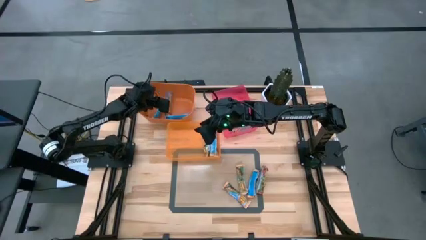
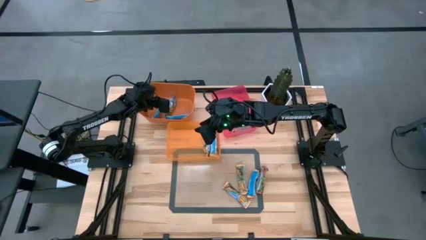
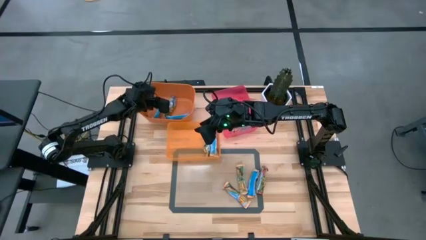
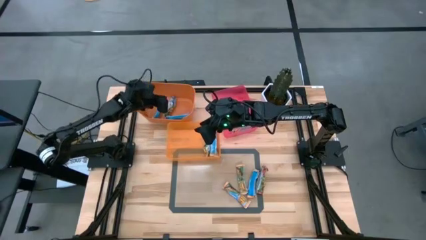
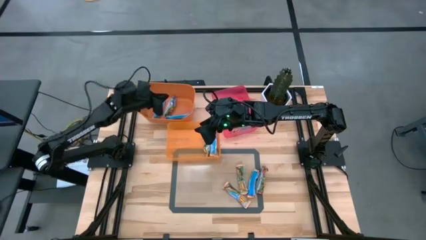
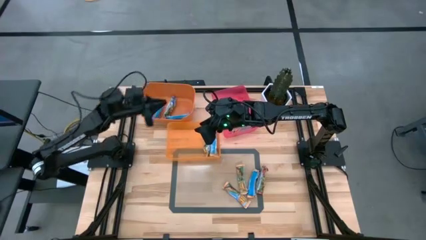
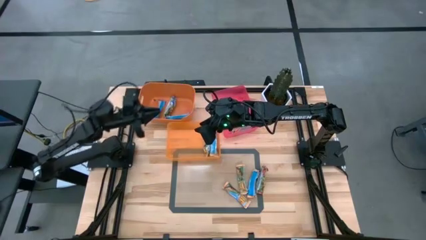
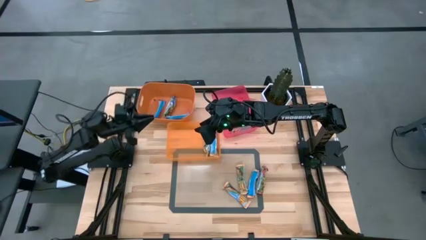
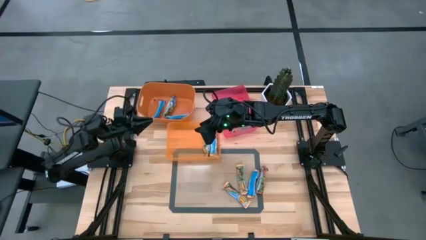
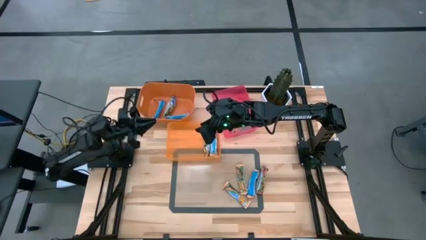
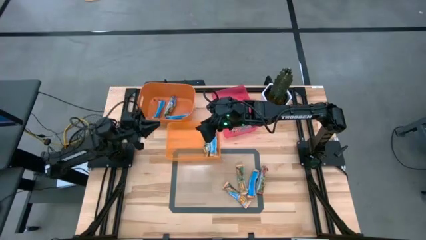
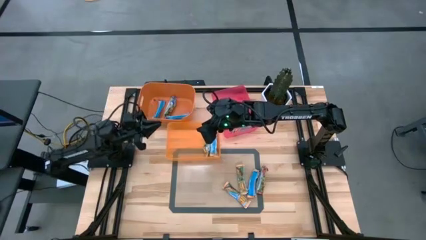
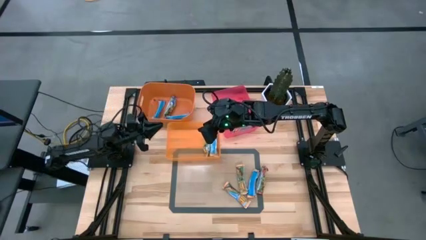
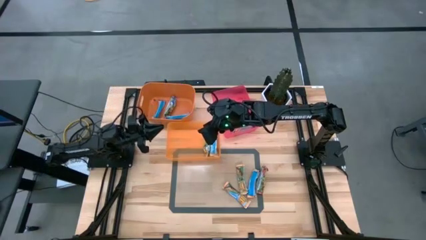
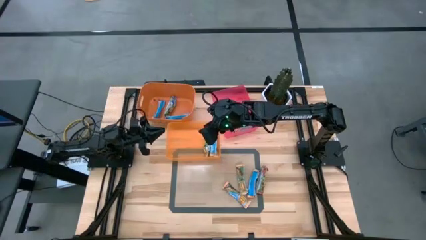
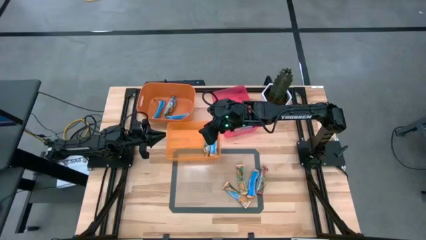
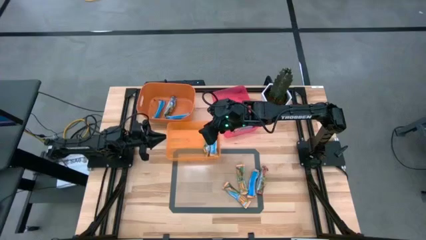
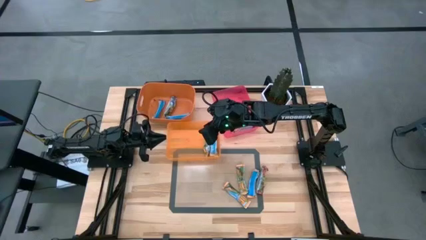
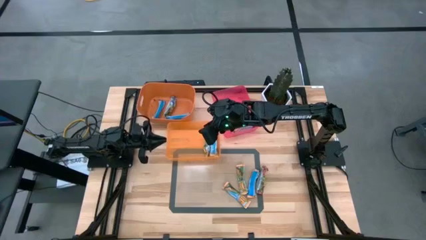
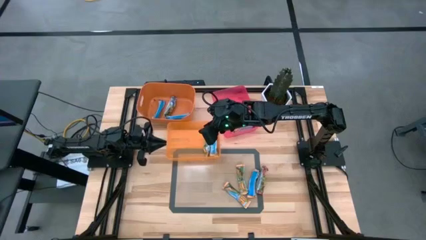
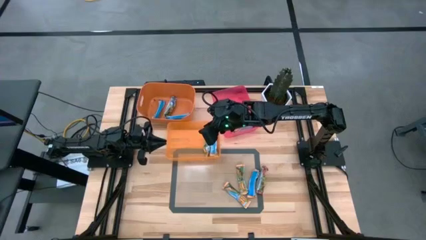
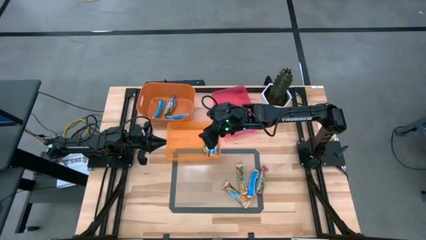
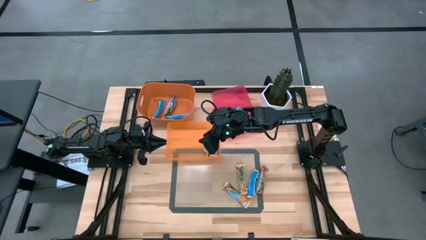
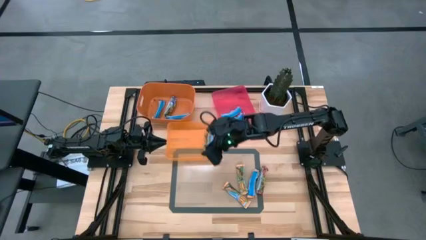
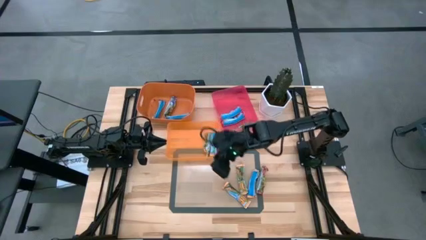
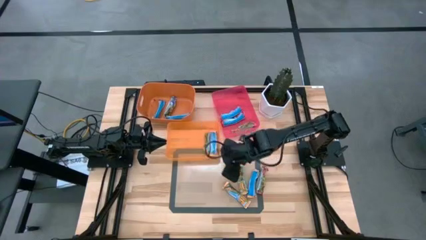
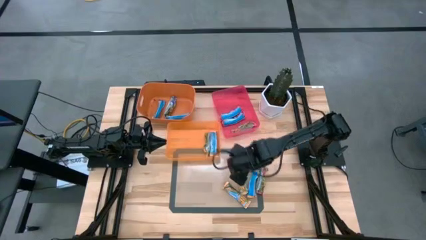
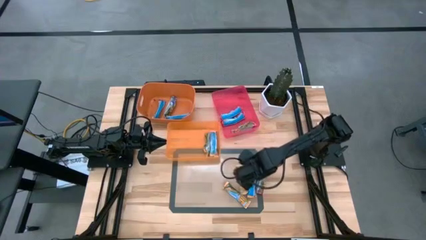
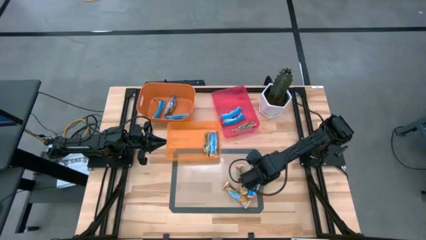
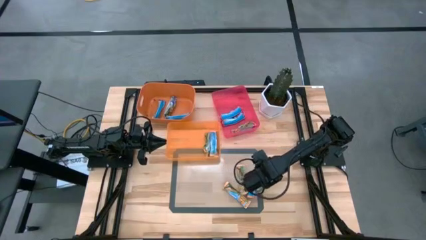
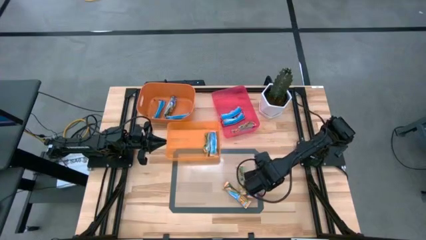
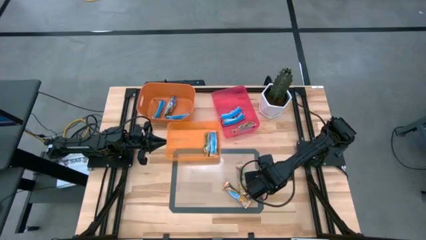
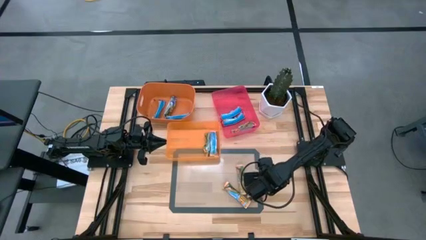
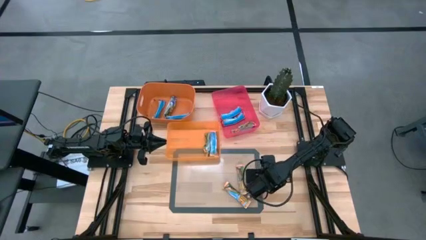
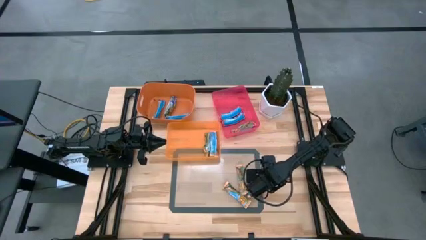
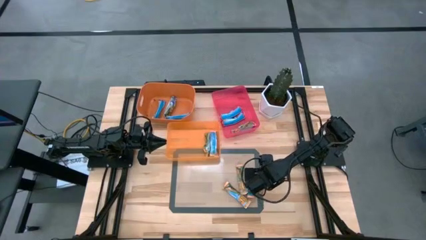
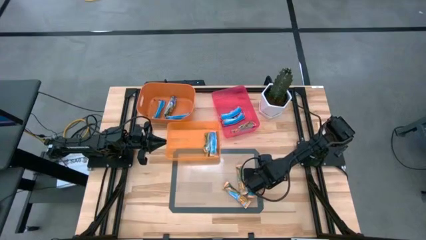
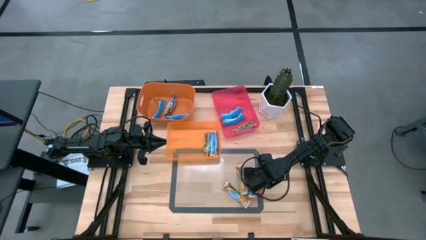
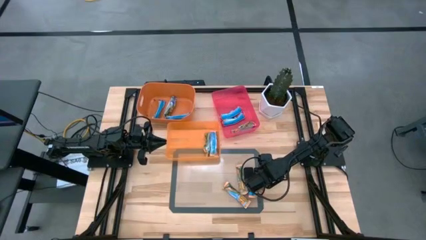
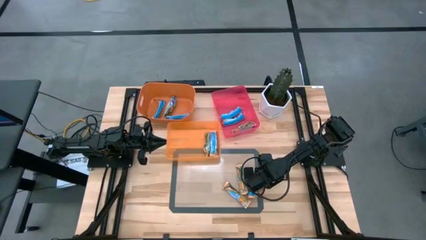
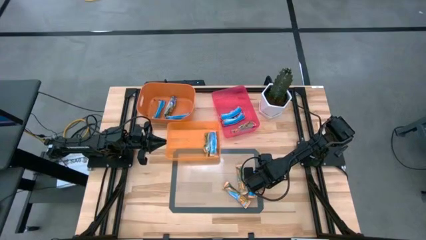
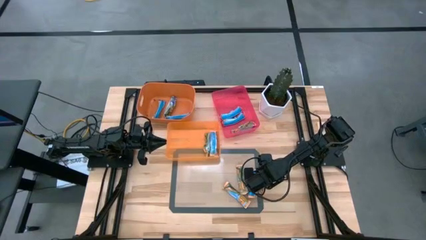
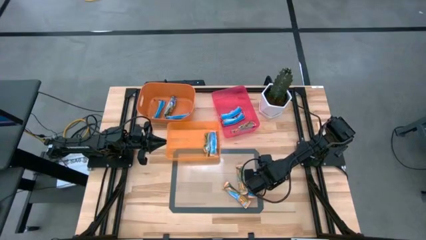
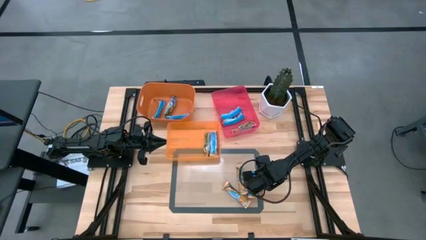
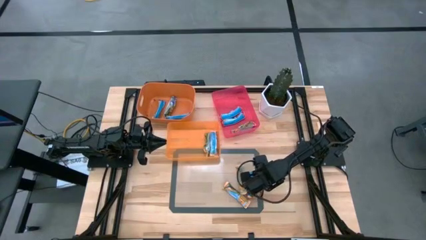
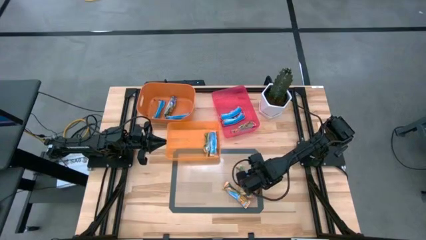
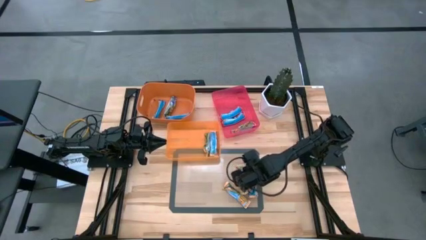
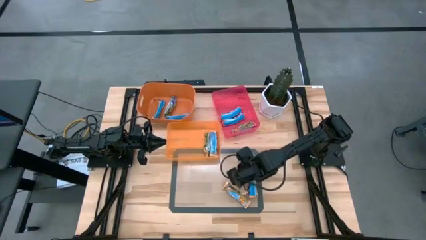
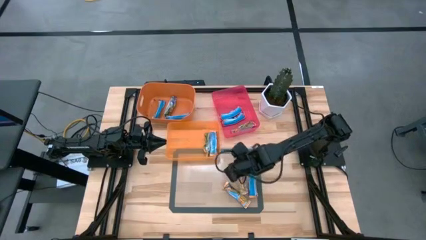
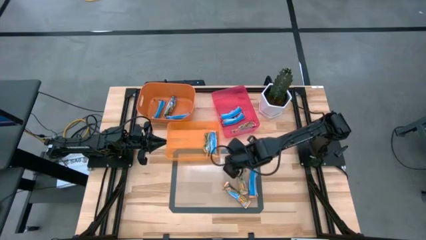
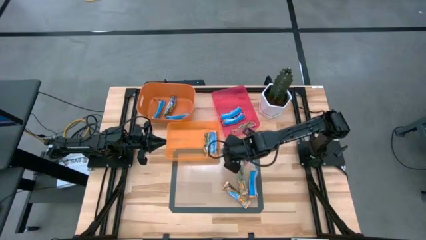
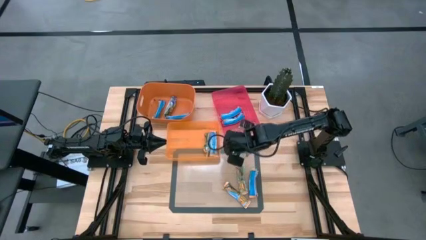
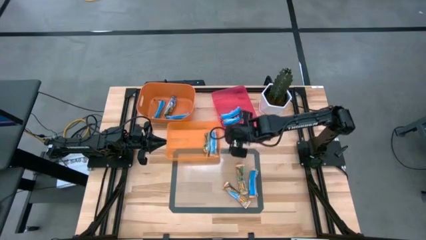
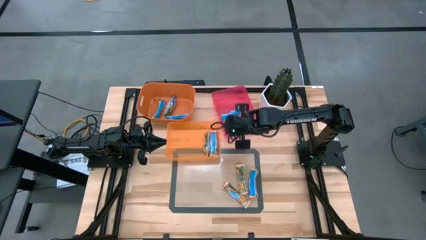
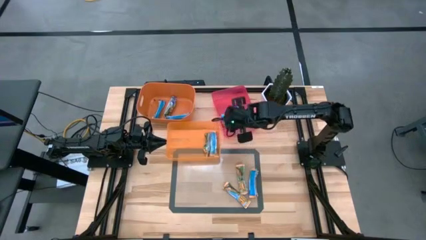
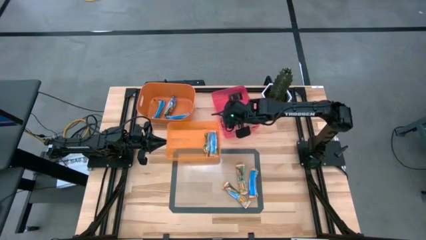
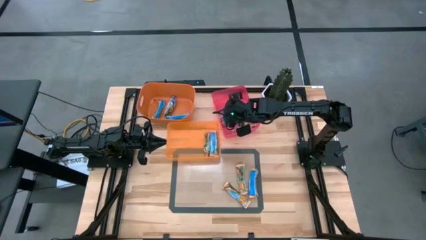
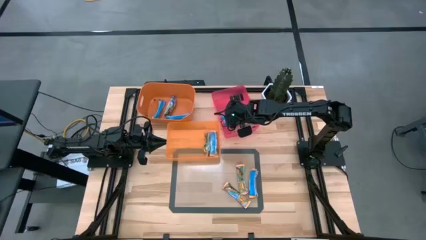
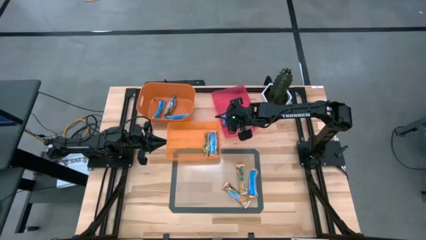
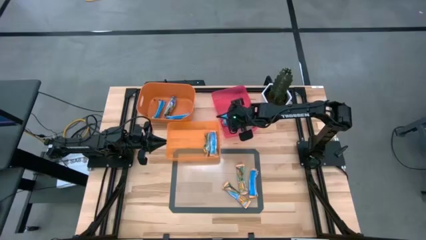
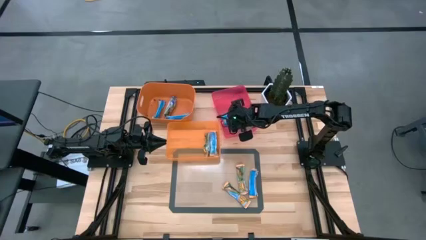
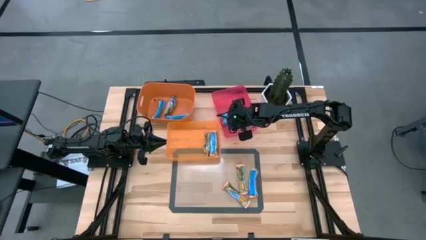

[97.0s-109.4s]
Task: Pick and place Granola Bars by type
Put the red granola bar into the red bin

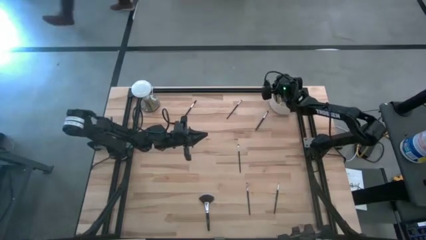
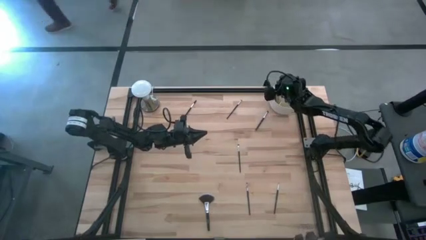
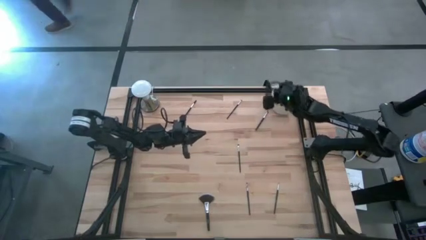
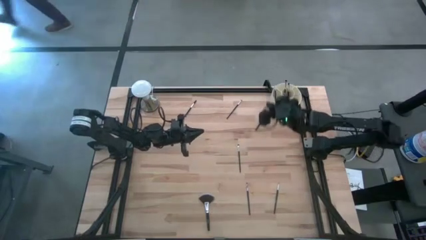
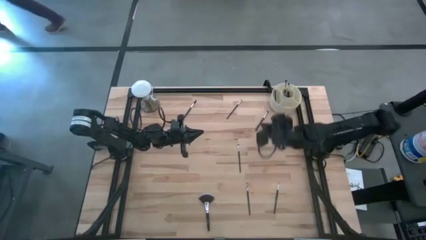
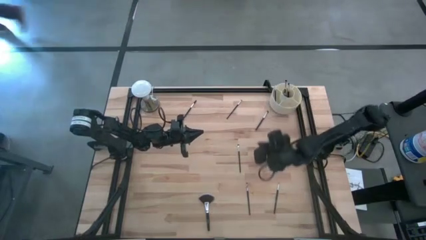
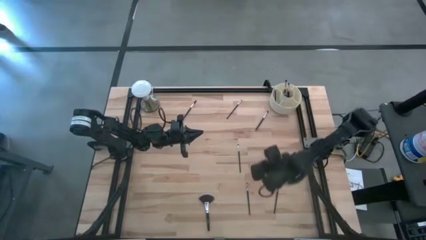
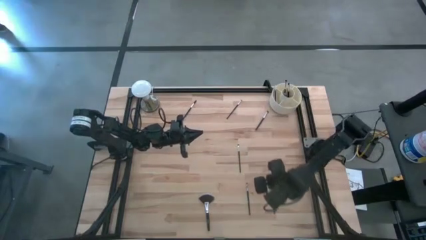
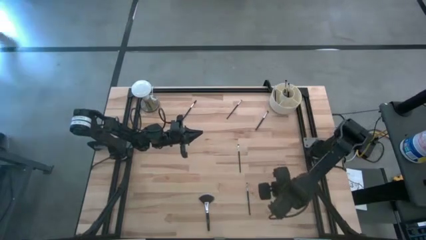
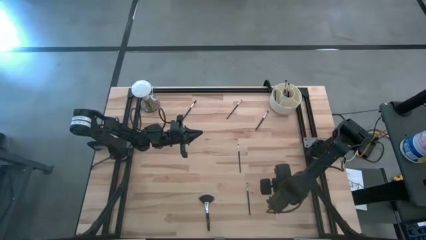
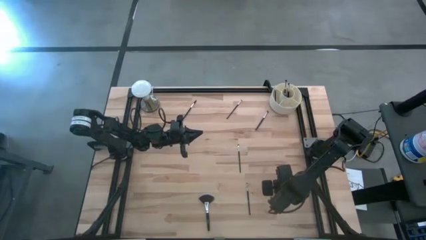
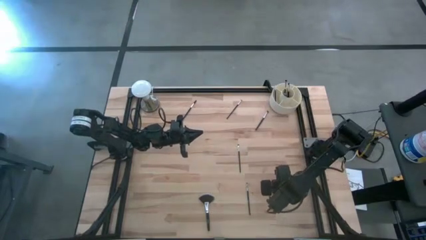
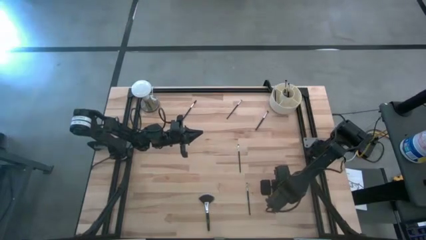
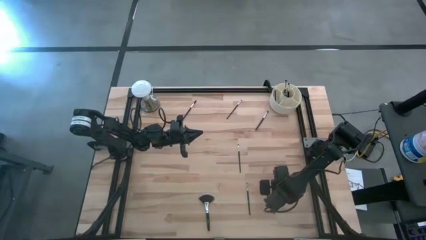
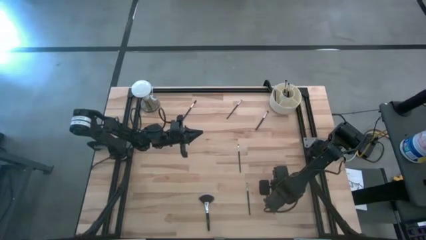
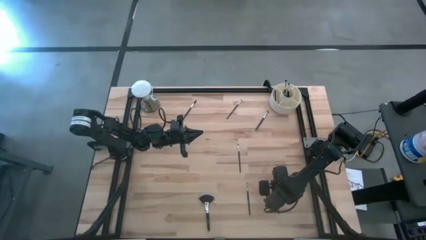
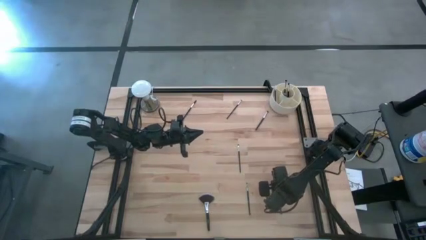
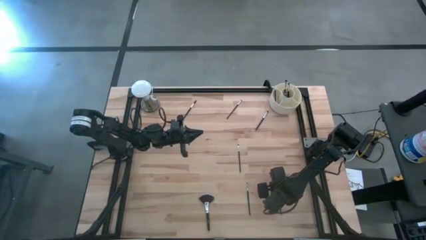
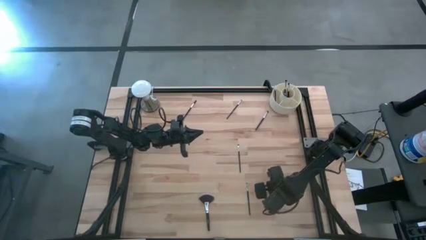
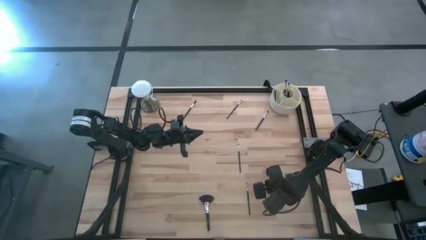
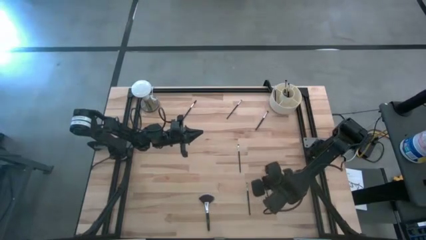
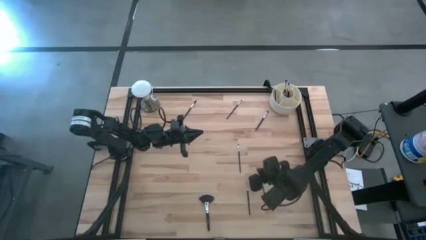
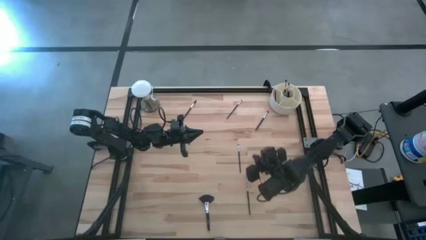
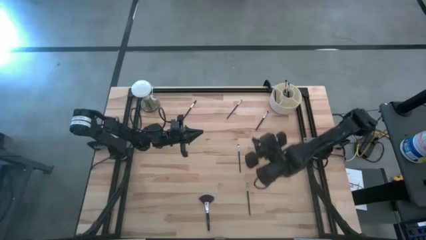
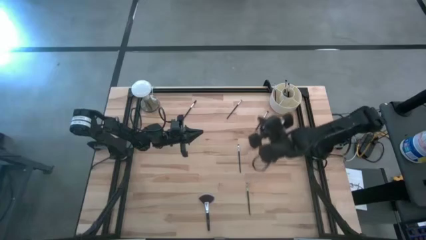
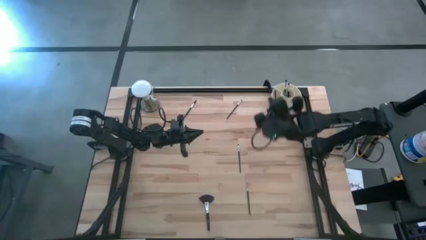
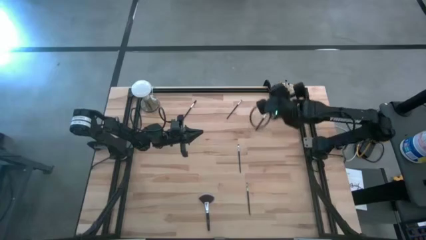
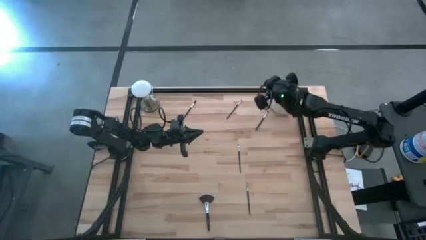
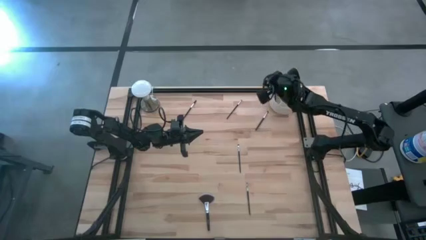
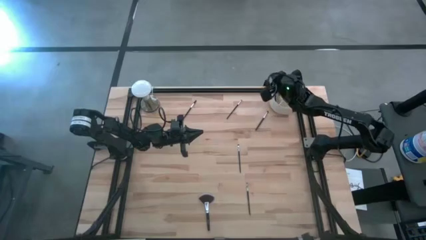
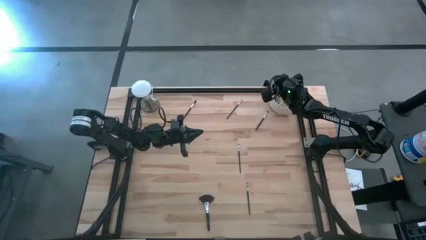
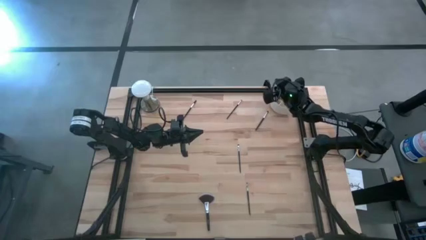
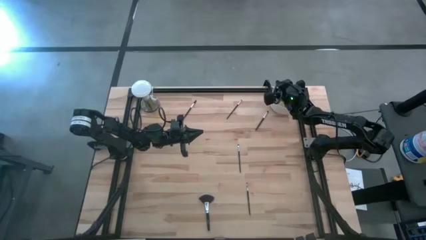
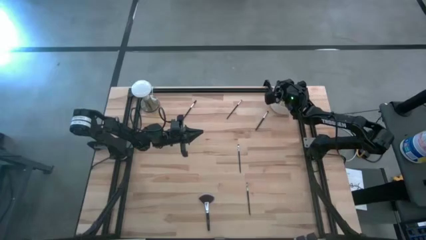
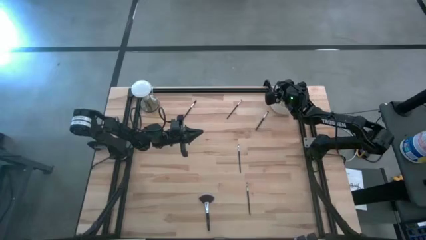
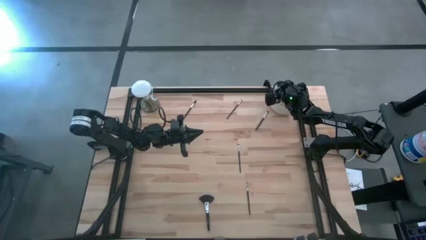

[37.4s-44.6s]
Task: Pick & Place Makeup Brushes
Put the black liner brush into the white makeup holder
